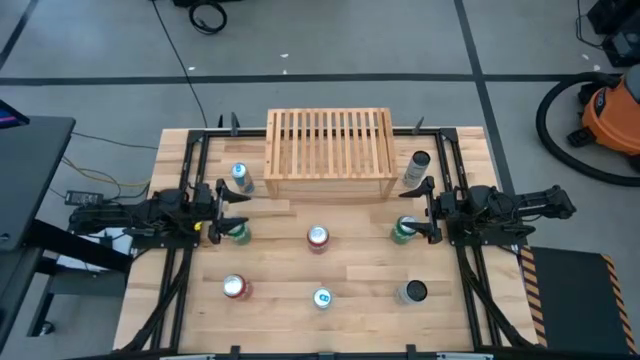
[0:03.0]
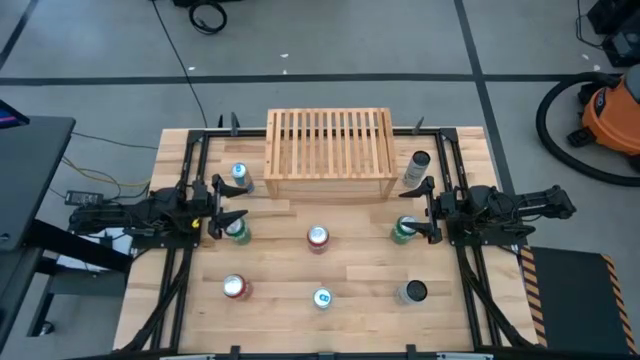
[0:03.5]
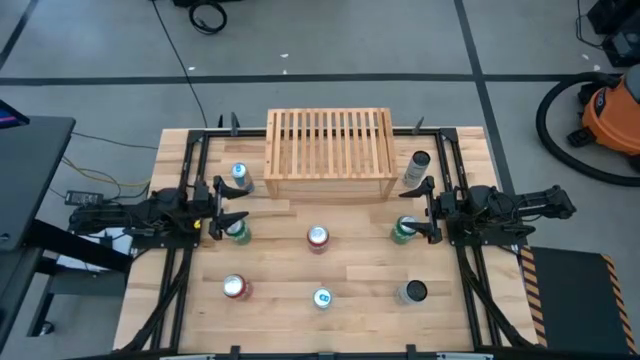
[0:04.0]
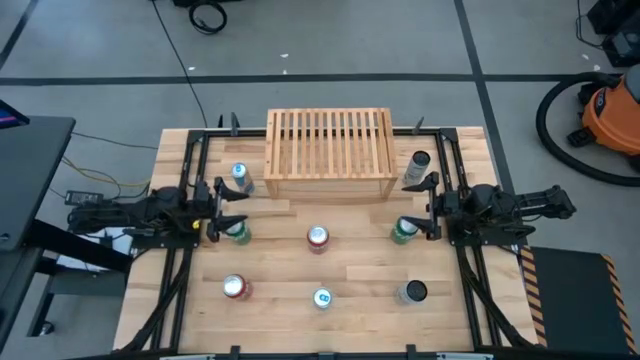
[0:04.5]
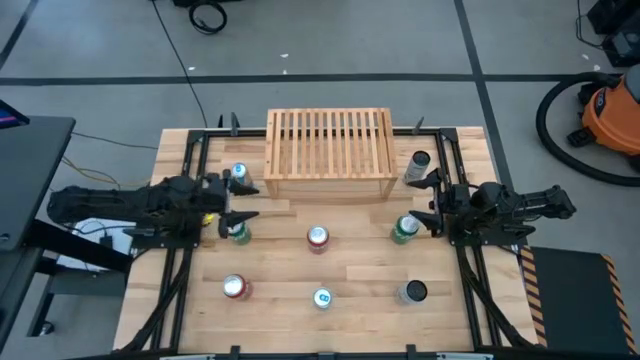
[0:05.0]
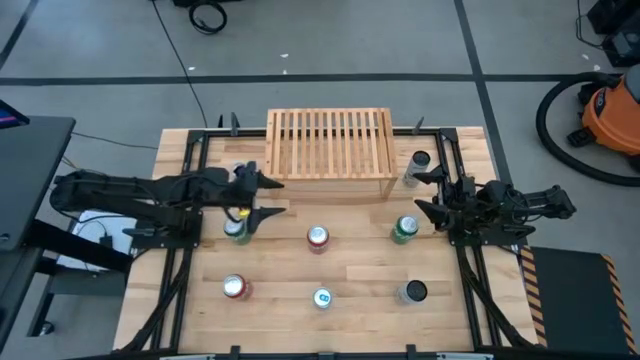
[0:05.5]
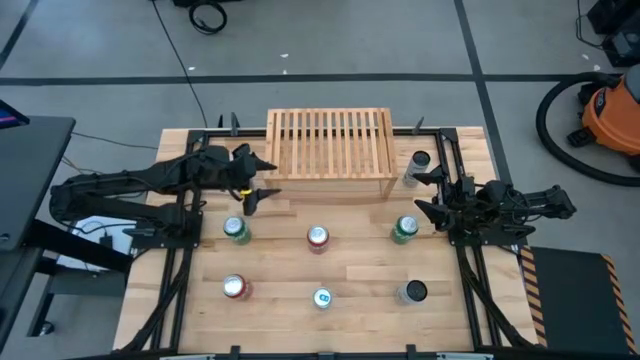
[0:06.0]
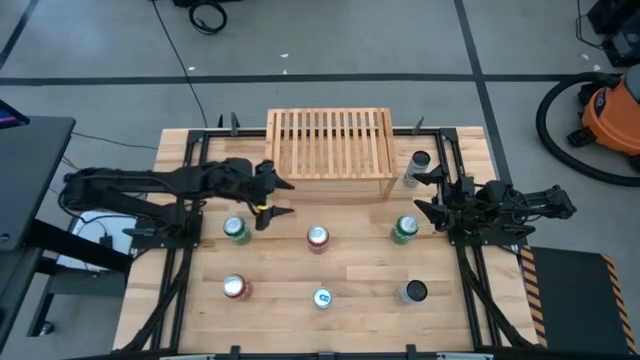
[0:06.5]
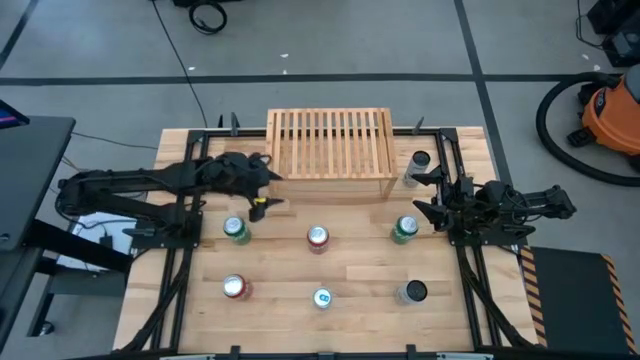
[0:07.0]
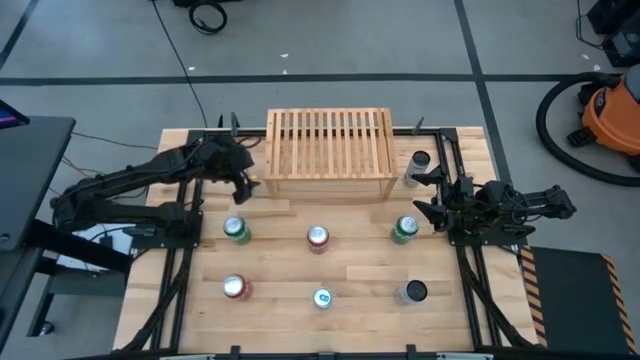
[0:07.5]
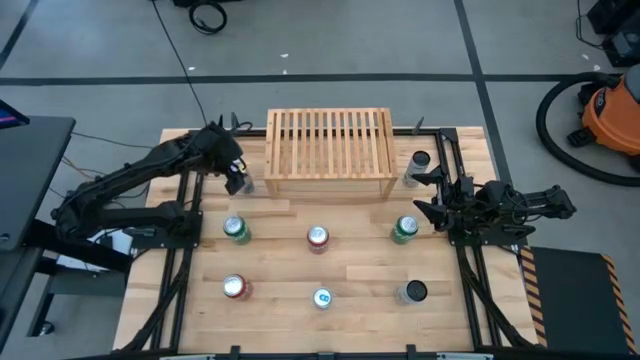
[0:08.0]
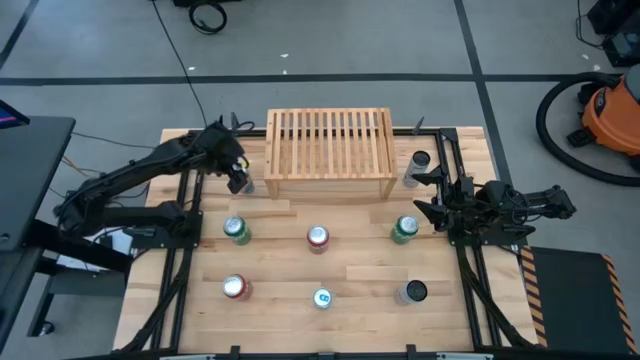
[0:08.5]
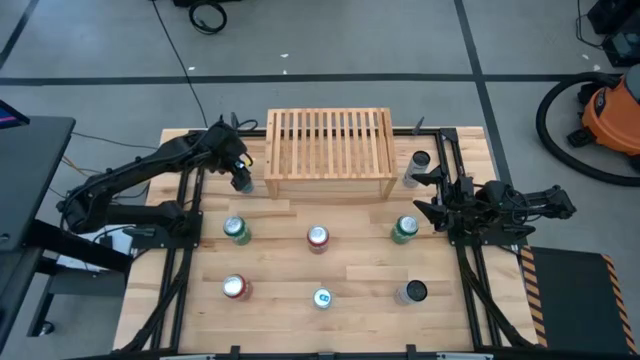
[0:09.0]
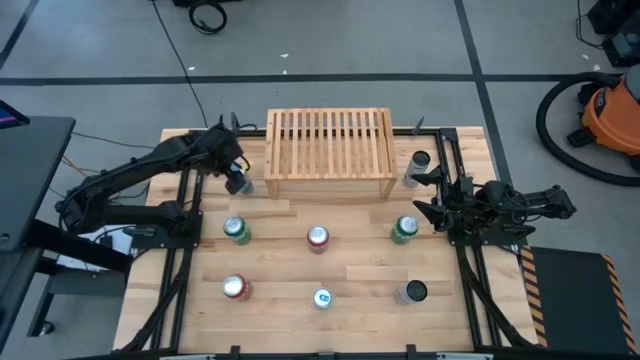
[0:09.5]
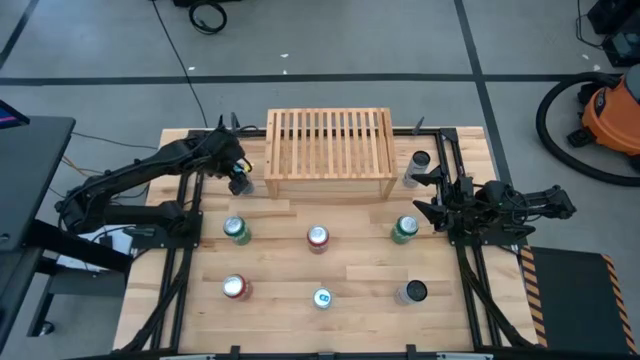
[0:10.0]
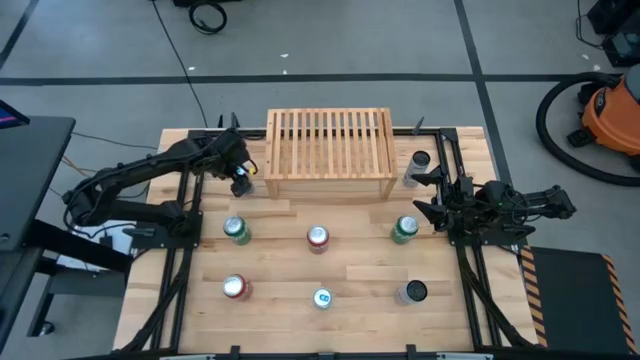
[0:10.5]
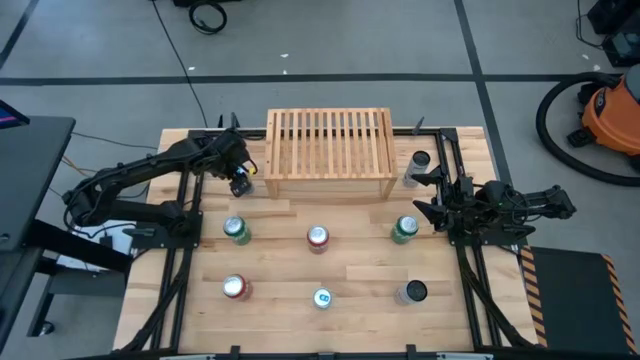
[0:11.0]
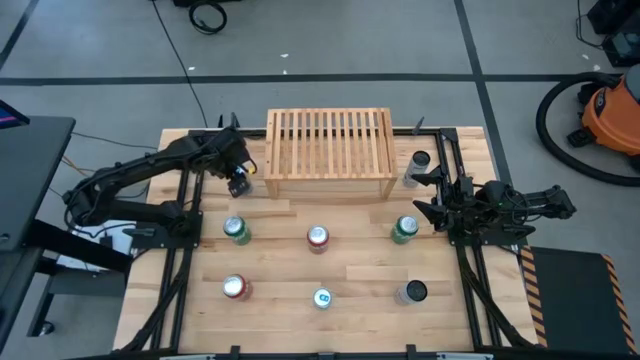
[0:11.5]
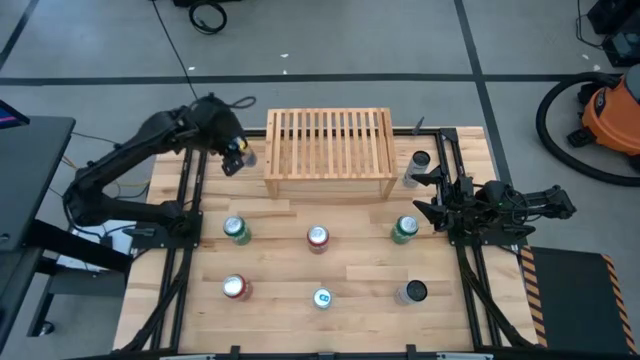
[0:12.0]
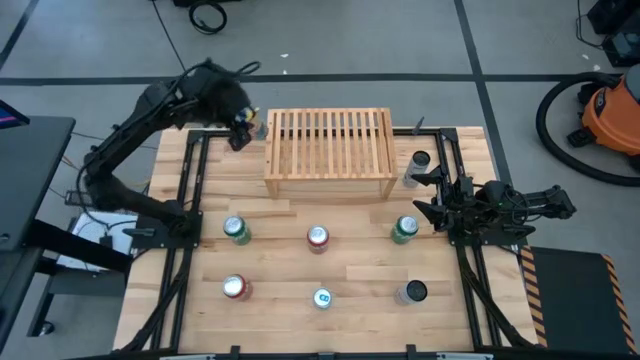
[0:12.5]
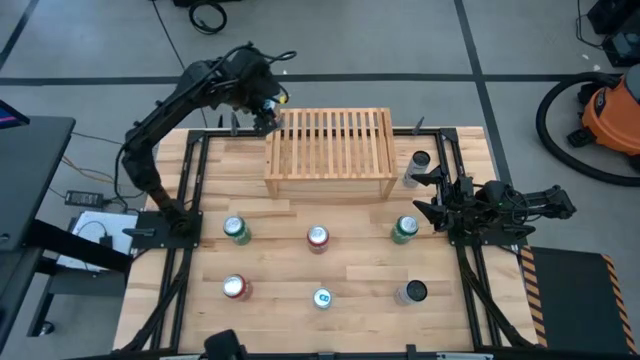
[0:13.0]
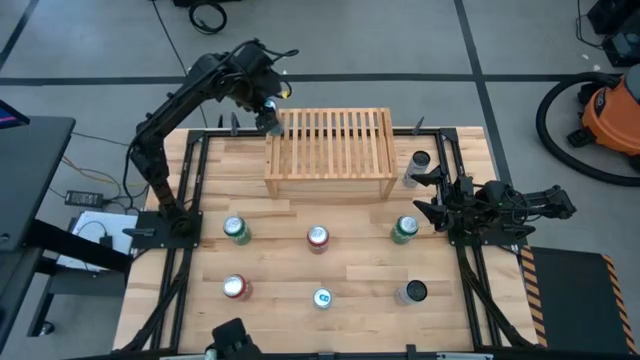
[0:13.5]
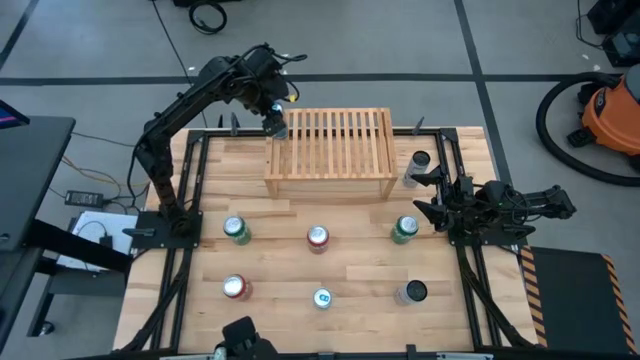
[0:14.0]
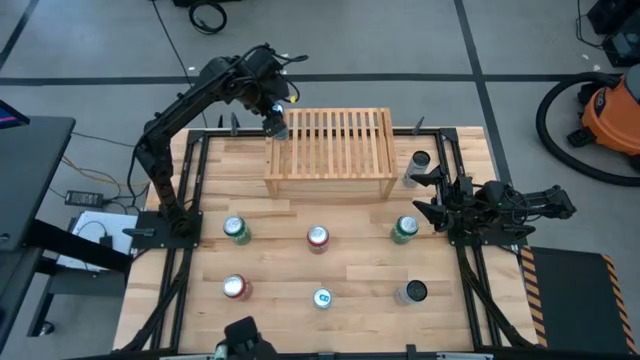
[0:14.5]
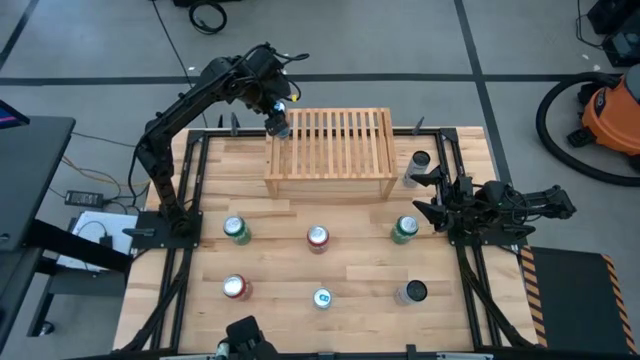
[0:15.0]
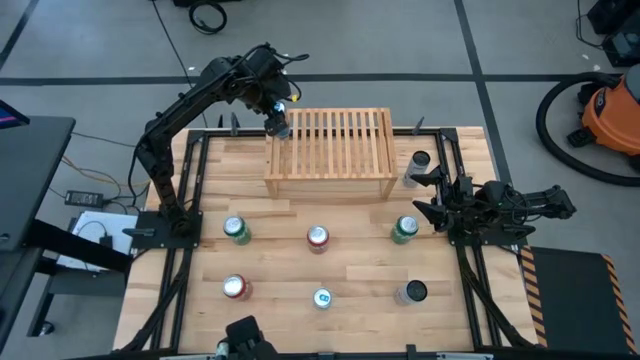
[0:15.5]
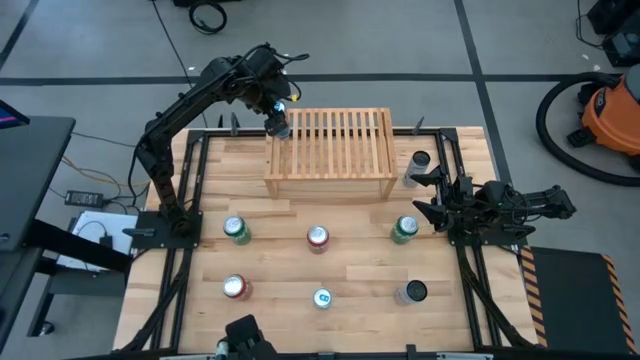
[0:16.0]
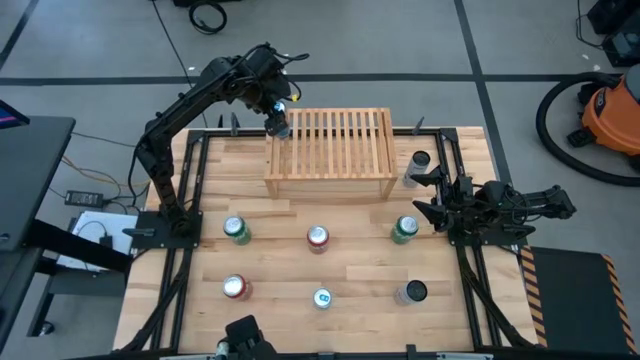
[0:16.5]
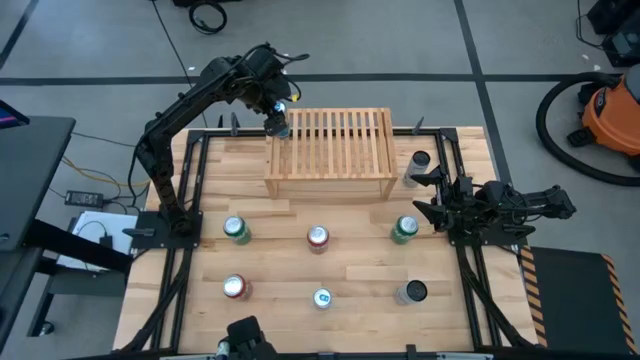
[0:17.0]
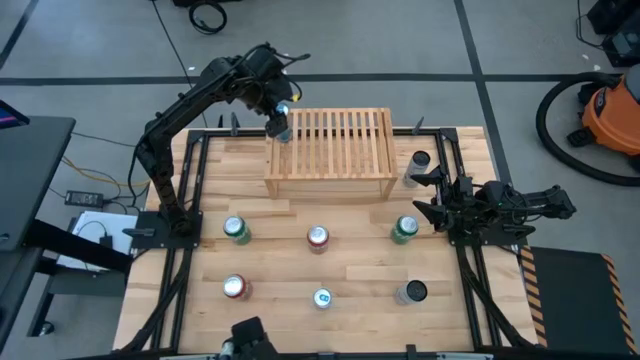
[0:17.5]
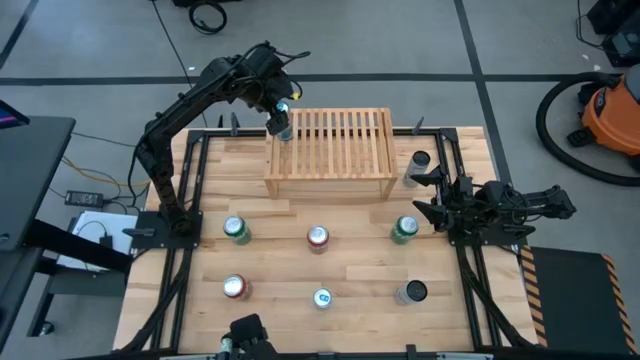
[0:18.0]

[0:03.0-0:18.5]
Task: Place canned beverage on shelf
Put the top blue soda can on the shelf

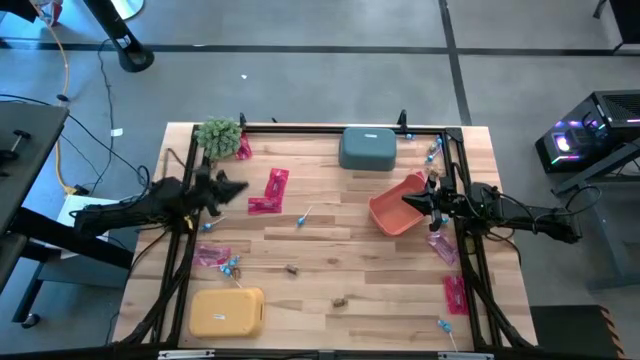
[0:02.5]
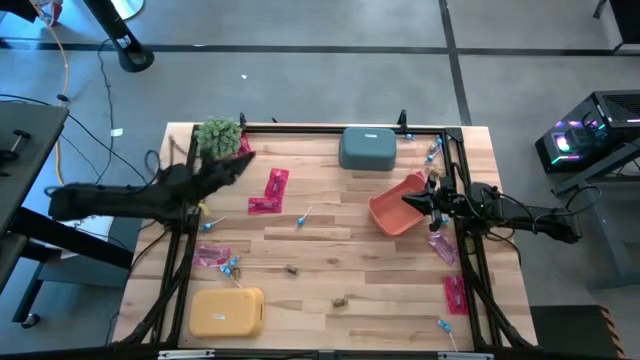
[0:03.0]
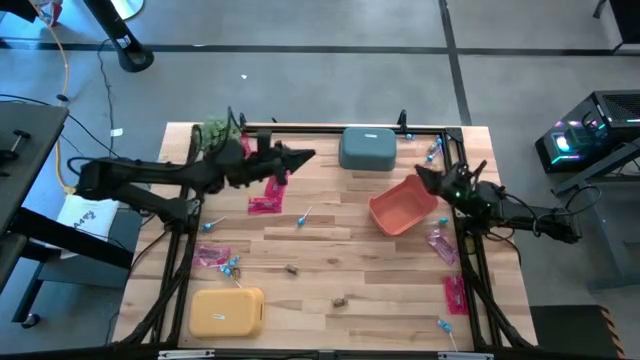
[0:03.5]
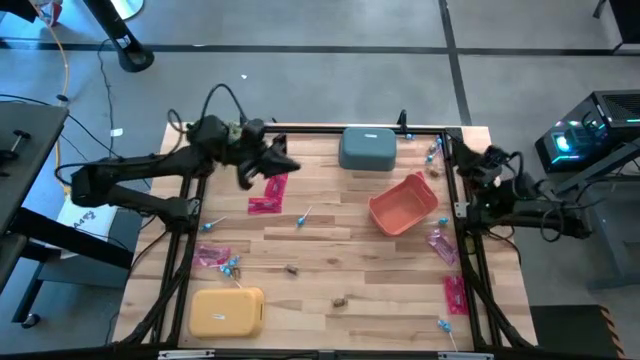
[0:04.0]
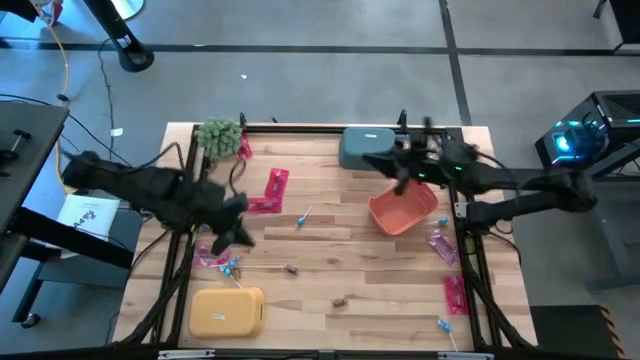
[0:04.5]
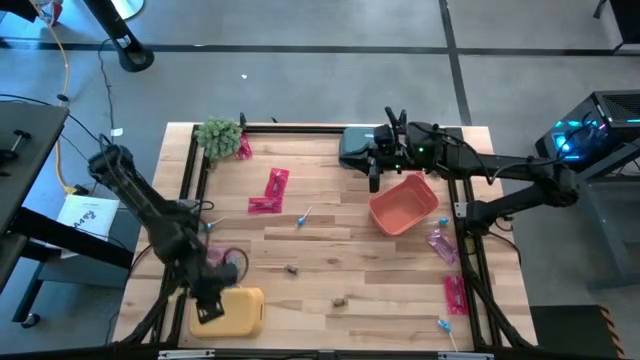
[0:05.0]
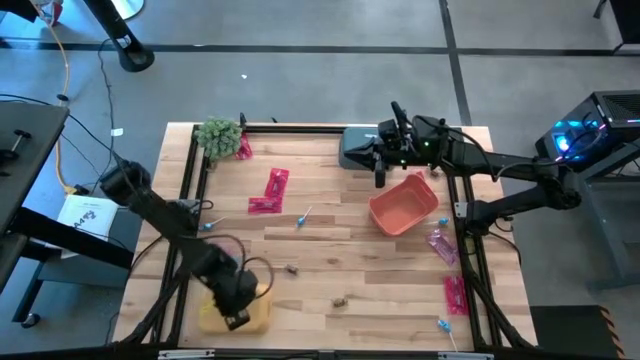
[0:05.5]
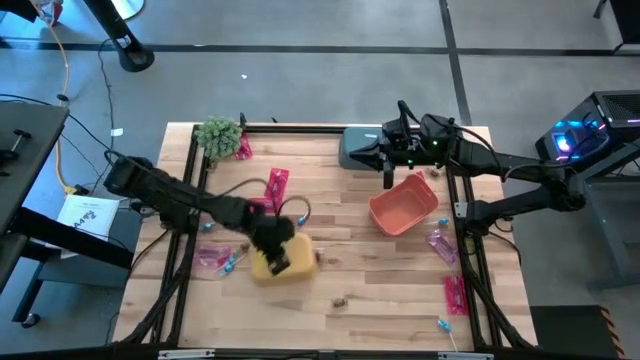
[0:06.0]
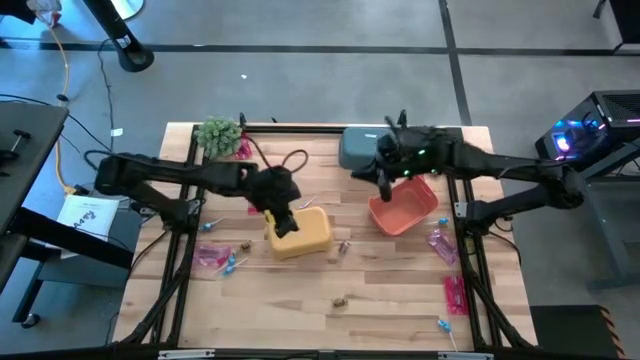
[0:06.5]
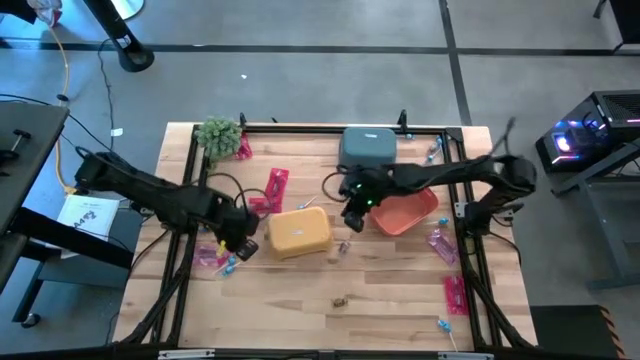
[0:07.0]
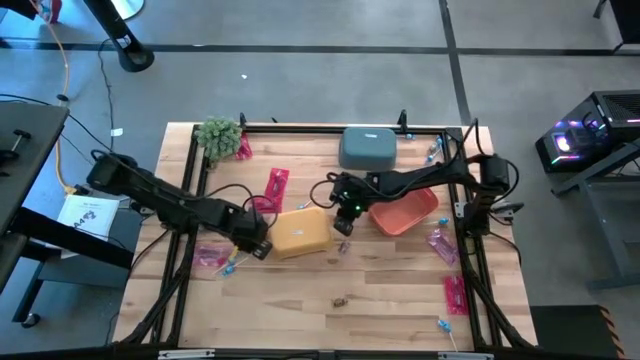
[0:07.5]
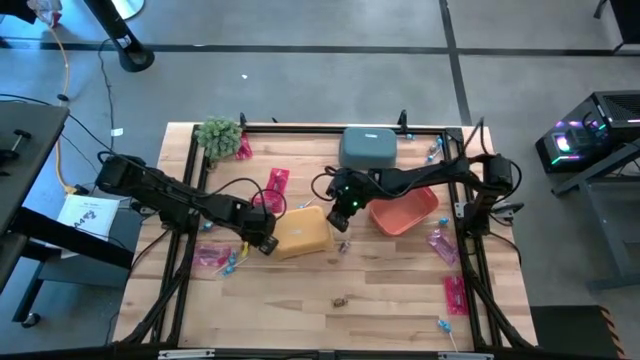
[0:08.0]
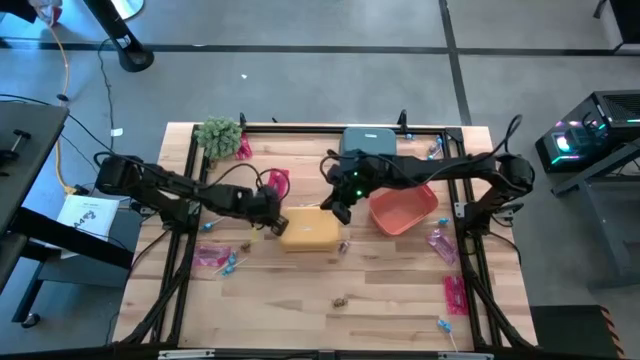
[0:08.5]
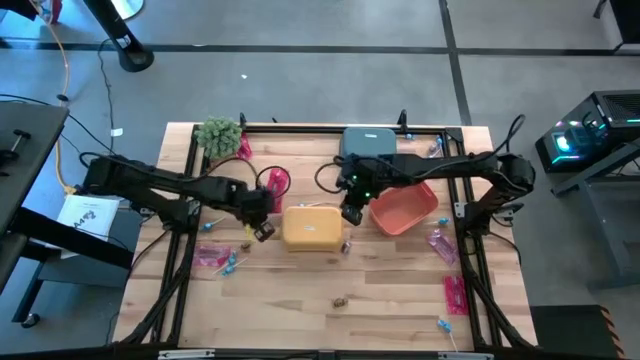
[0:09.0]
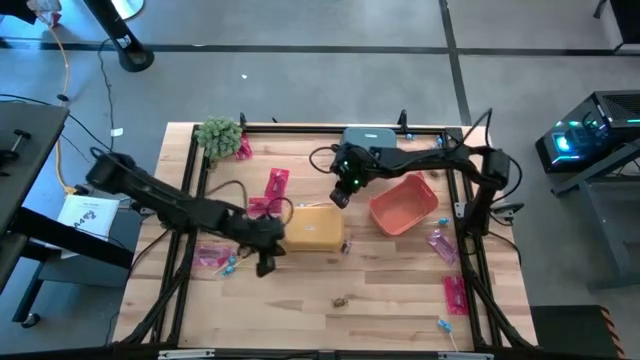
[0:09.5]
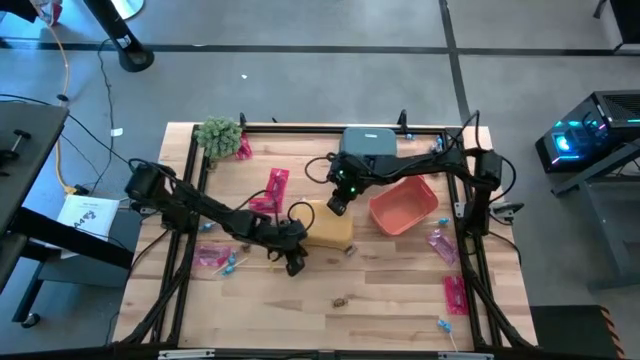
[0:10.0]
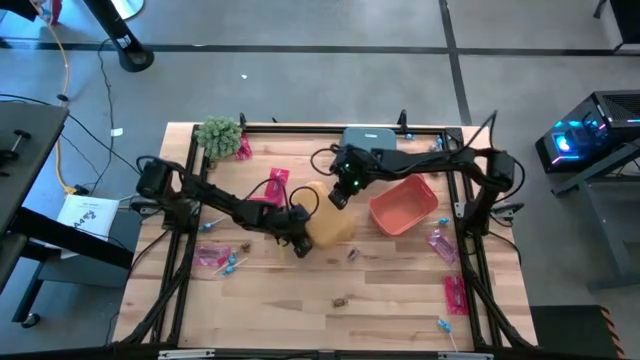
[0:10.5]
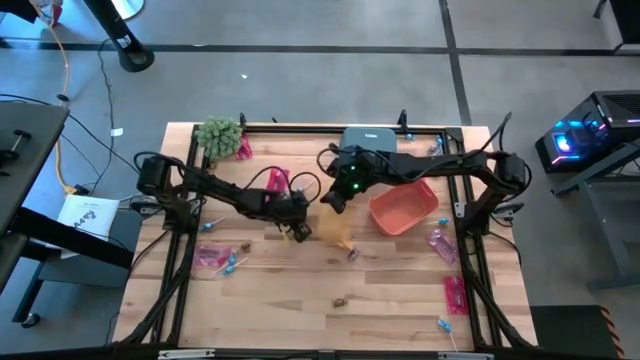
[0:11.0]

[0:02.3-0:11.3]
Task: Sort candy
Prepare the yellow bin
